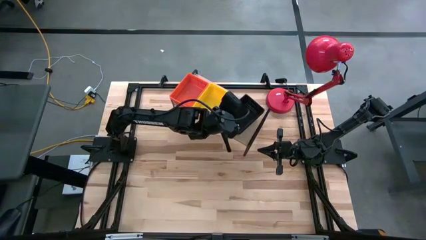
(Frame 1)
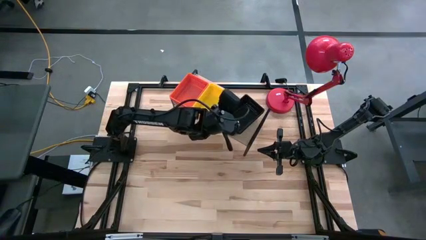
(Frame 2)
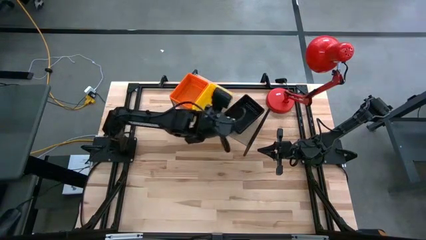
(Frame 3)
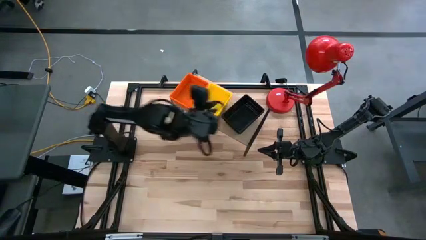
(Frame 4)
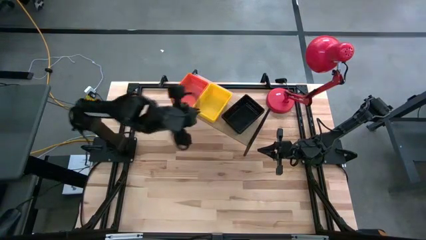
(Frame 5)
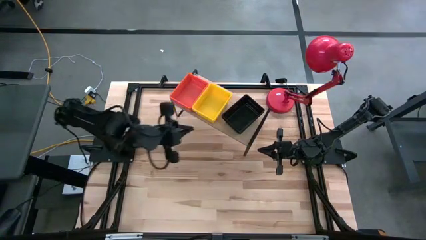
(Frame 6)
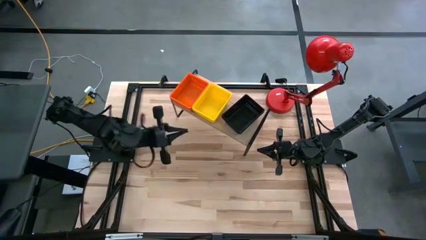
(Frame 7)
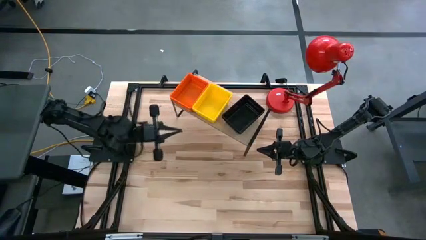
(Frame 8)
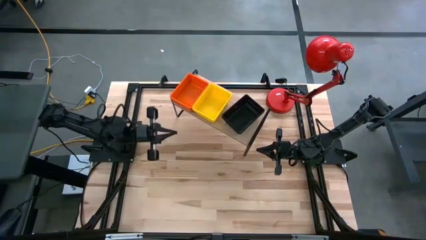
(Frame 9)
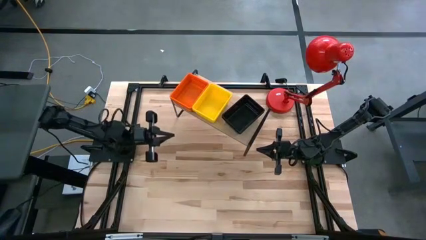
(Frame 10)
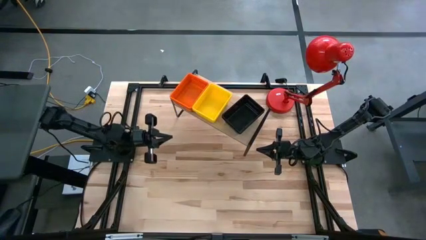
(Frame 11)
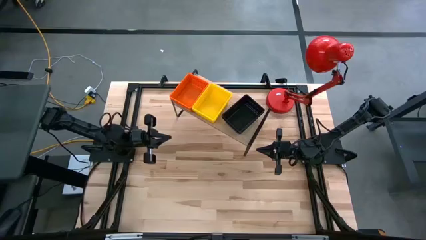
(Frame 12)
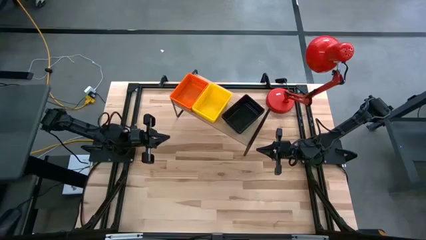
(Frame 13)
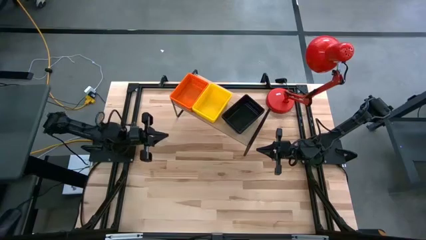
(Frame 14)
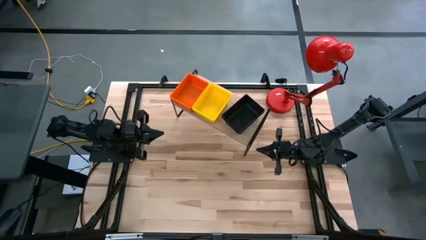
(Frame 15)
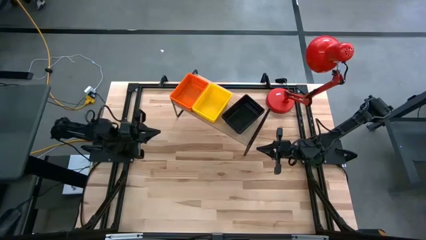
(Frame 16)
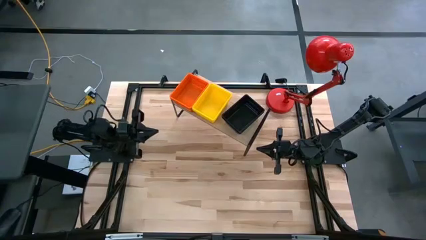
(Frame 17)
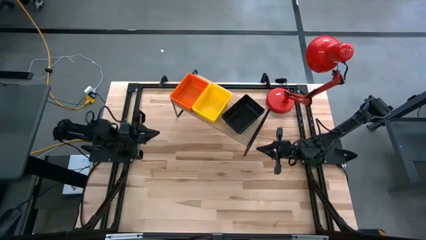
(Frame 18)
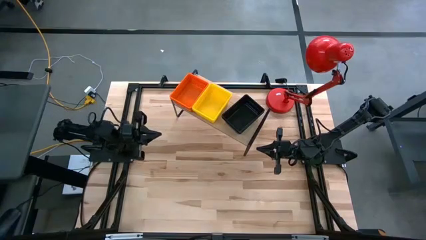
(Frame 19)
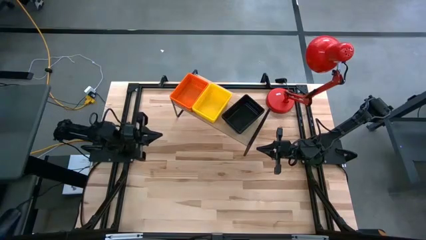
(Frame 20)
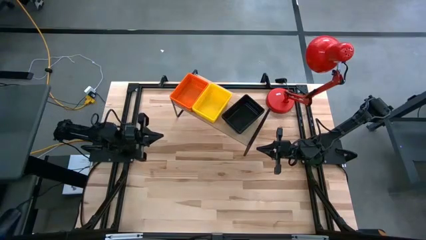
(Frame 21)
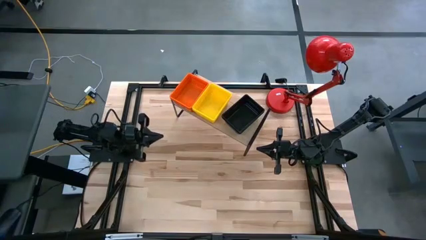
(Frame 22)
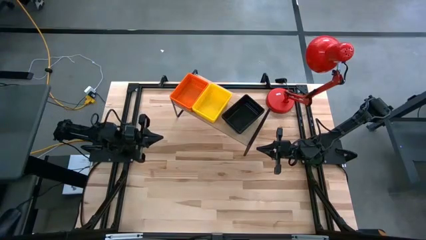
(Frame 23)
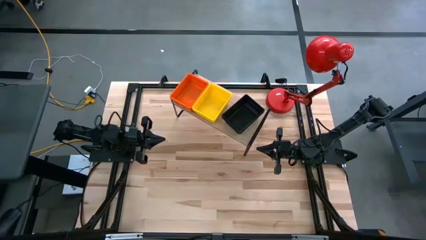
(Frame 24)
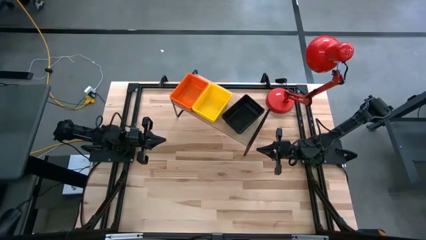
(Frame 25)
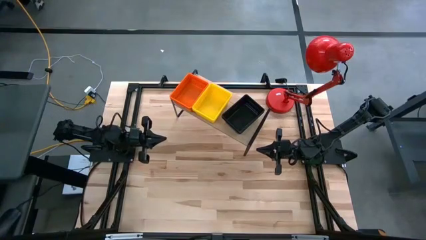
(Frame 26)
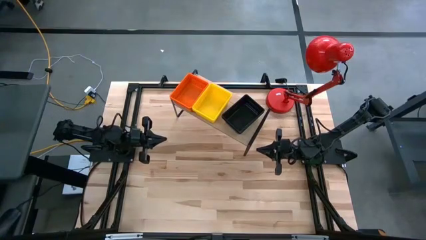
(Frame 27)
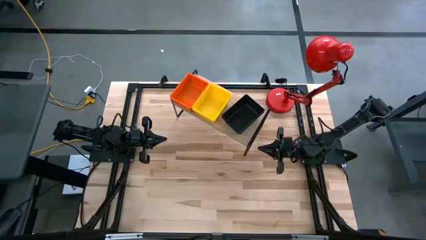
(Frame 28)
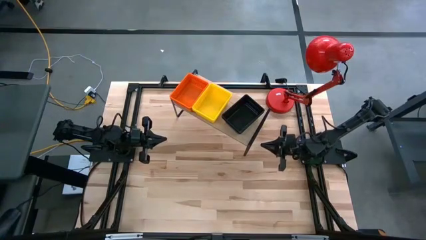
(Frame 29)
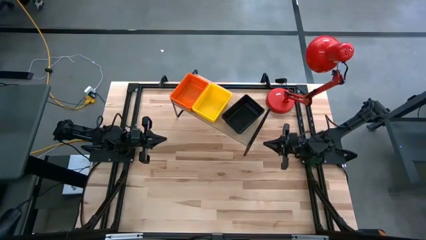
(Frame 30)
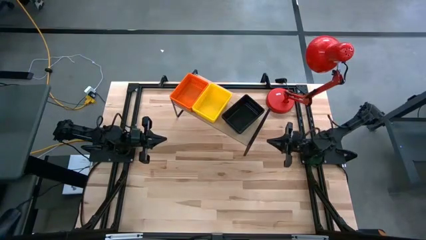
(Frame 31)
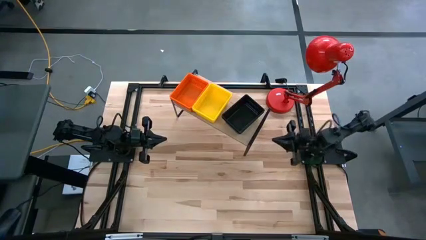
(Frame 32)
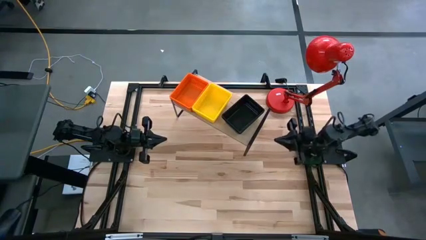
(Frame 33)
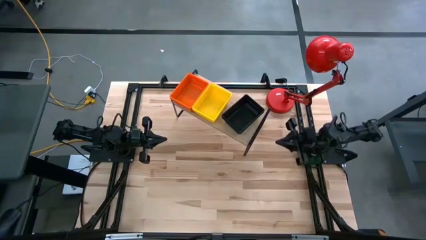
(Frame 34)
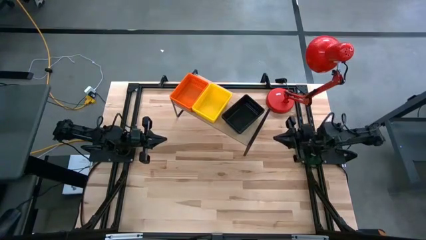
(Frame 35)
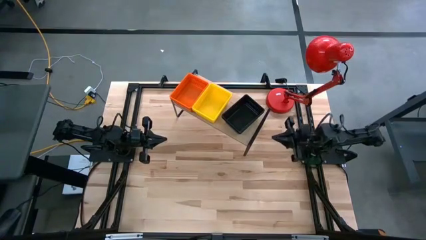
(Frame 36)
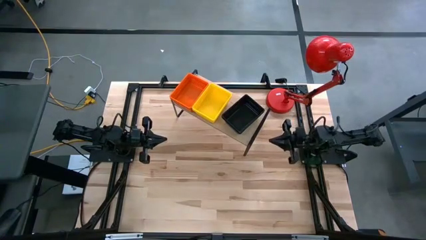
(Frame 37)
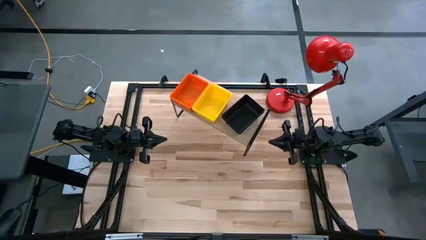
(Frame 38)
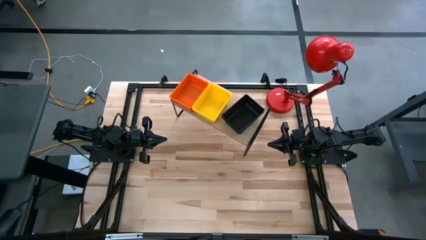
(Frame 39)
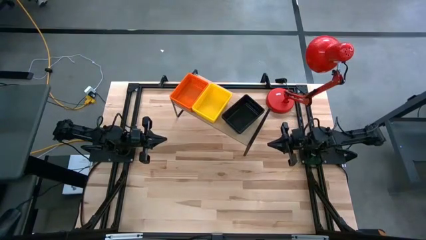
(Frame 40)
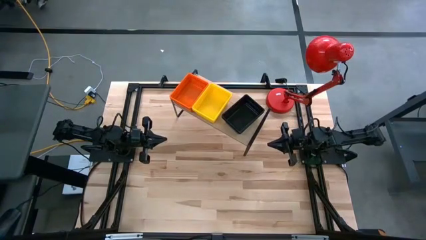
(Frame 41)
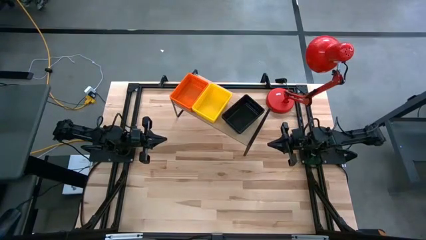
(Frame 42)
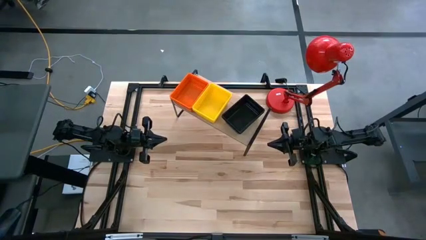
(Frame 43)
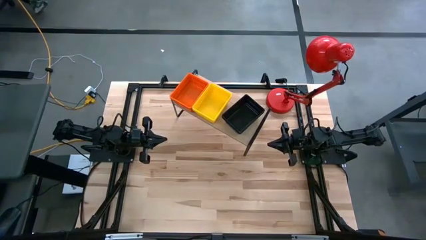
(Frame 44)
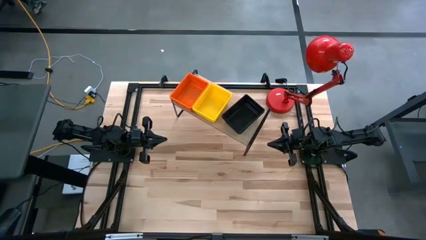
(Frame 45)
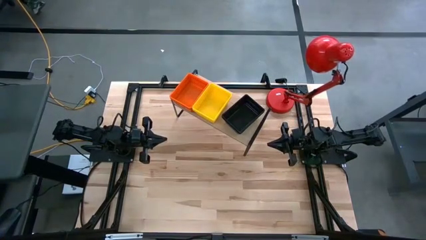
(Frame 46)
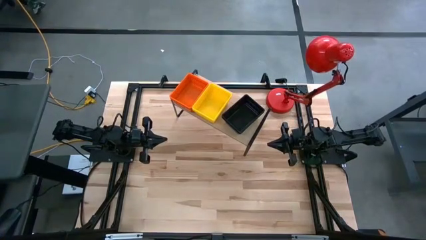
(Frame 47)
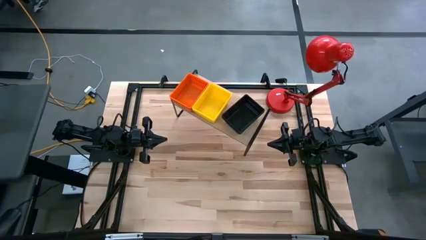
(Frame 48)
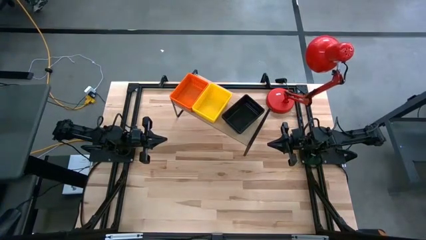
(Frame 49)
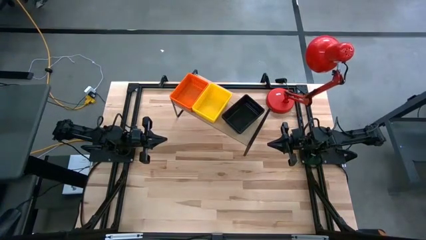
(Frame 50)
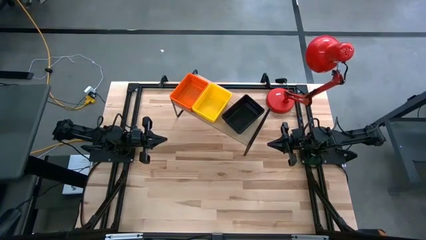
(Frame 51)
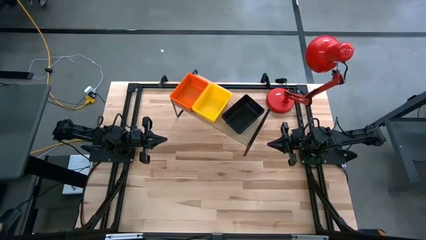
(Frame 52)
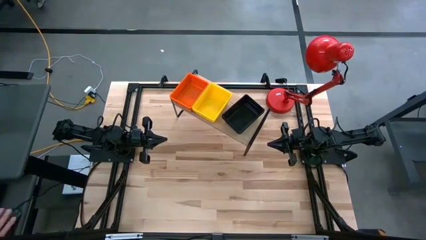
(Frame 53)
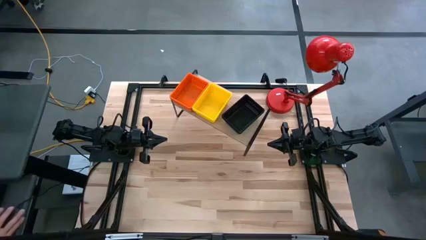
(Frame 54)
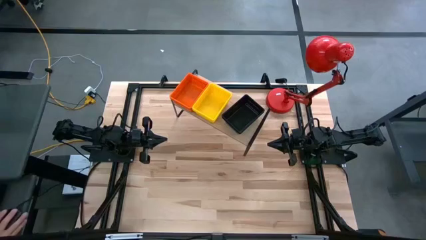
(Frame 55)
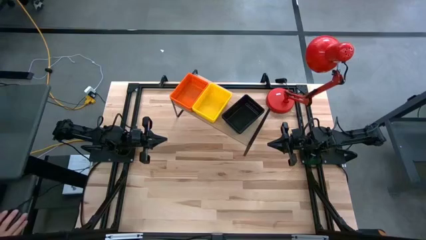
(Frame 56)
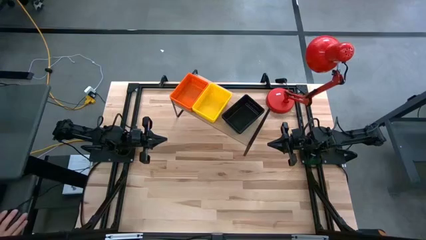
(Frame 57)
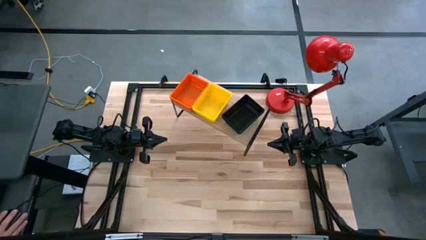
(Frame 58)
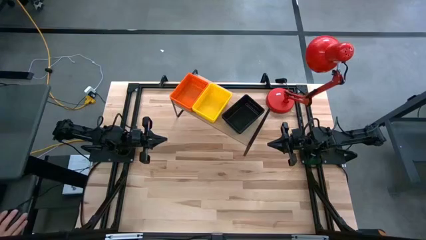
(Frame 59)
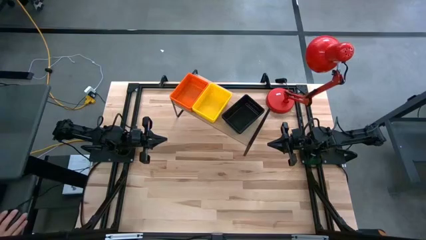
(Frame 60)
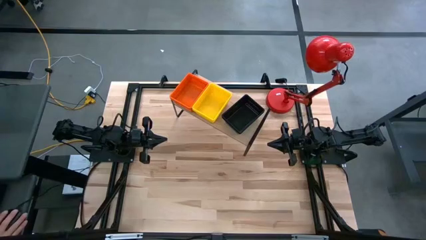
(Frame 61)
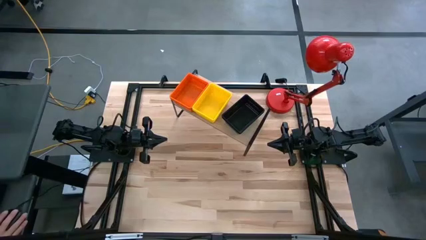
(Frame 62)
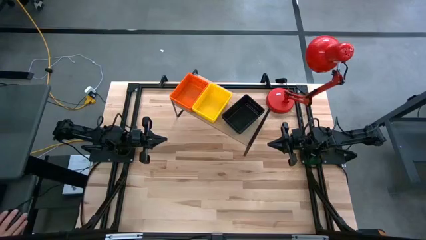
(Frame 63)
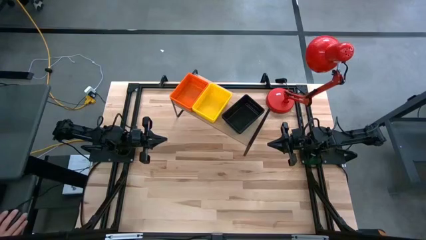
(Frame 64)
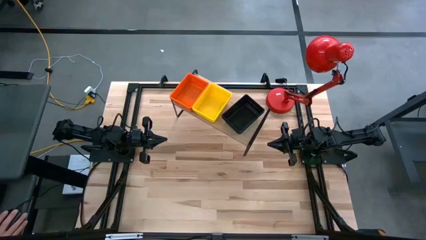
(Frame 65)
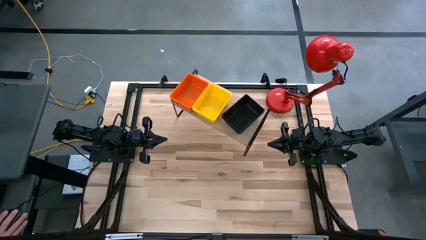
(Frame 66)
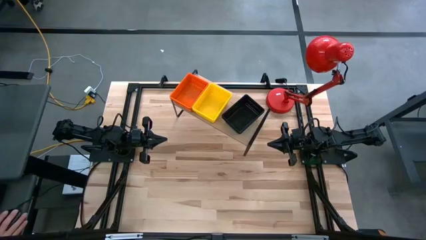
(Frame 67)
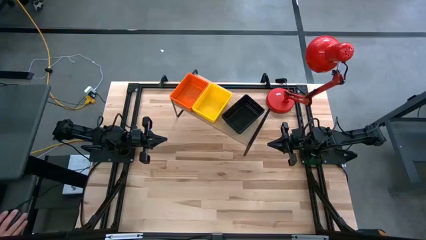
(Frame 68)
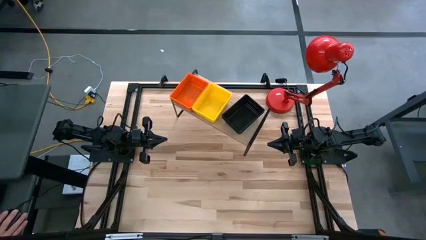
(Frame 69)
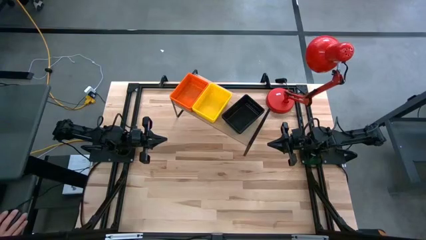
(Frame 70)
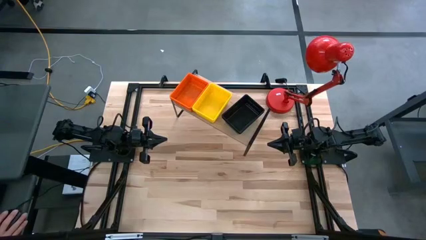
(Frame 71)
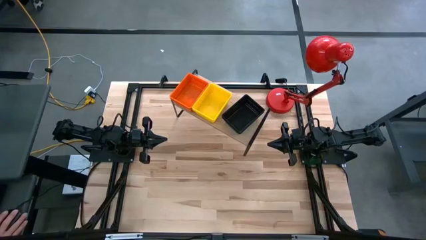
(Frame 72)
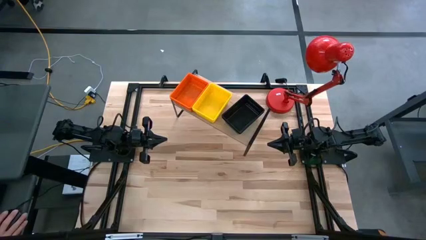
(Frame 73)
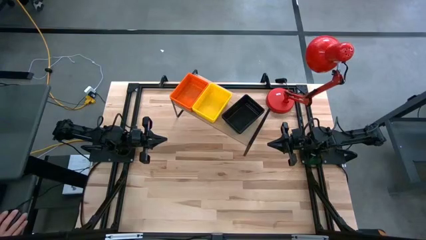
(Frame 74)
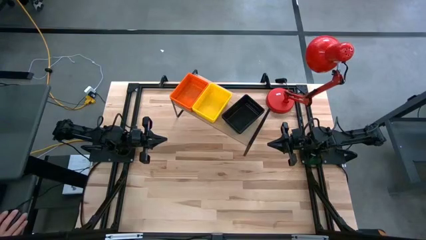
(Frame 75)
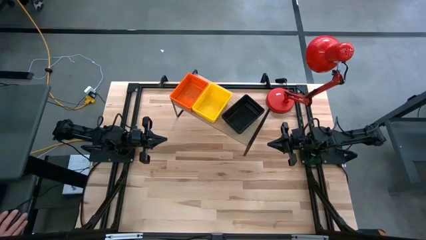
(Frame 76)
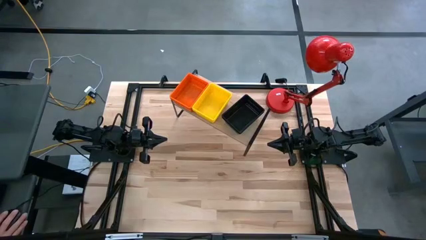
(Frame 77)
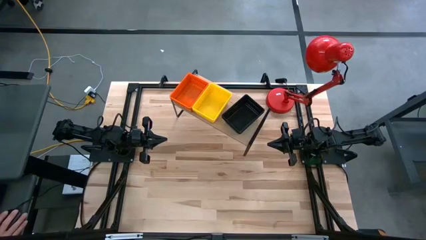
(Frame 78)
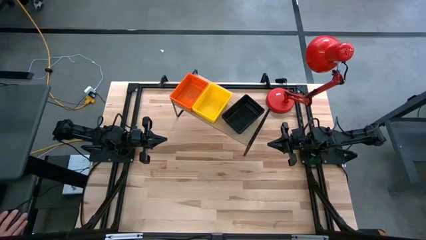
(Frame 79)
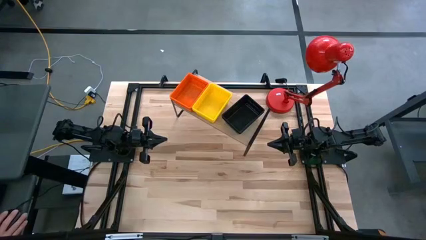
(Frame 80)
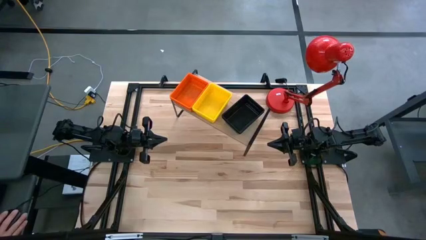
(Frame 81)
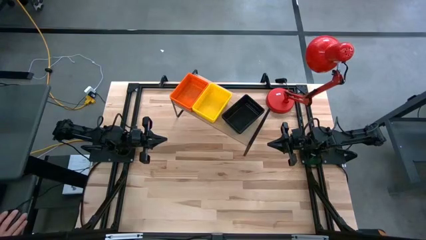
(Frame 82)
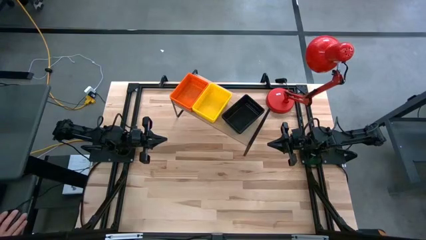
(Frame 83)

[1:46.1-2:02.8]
Task: Stack baskets on shelf by color
Return to Home Position
